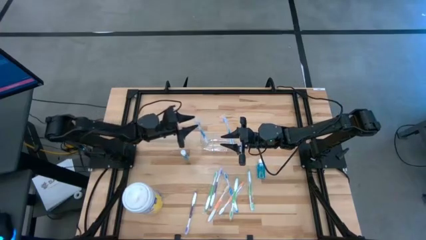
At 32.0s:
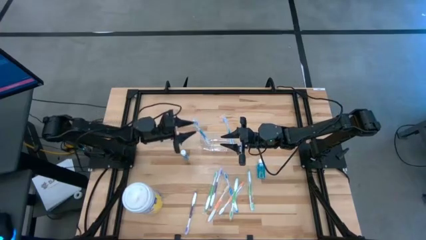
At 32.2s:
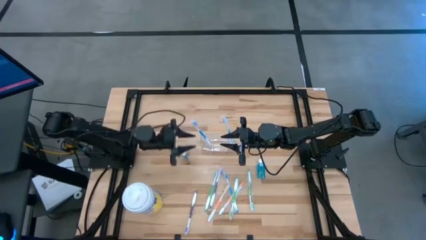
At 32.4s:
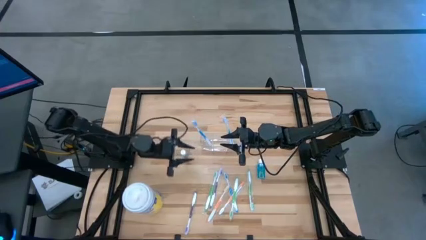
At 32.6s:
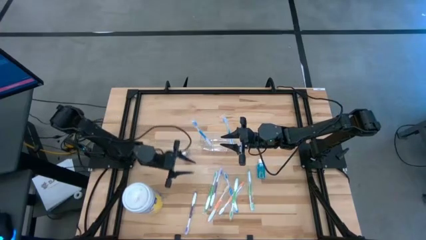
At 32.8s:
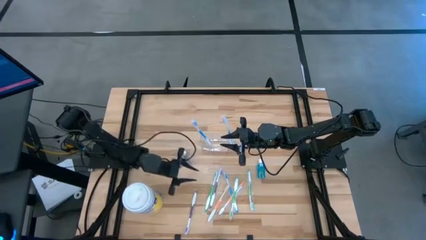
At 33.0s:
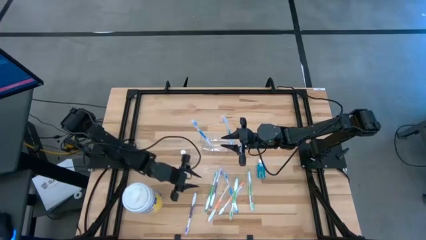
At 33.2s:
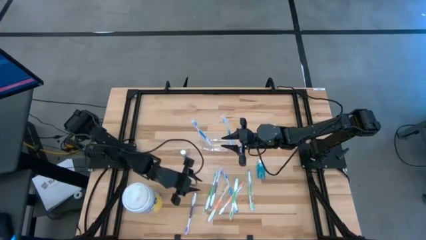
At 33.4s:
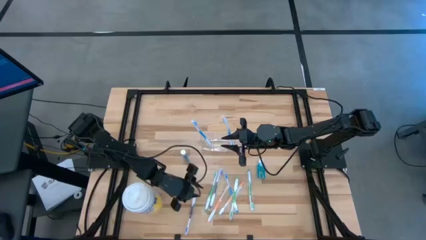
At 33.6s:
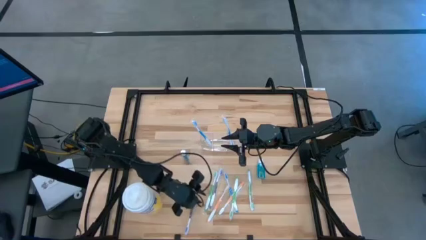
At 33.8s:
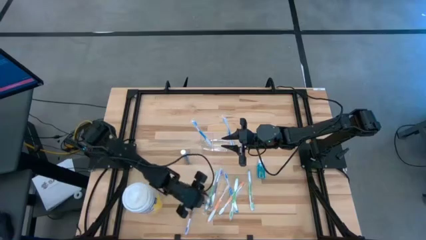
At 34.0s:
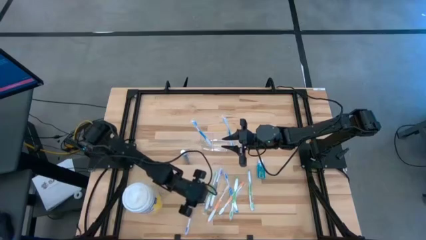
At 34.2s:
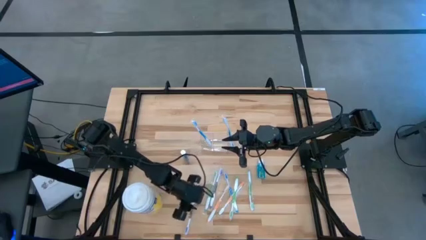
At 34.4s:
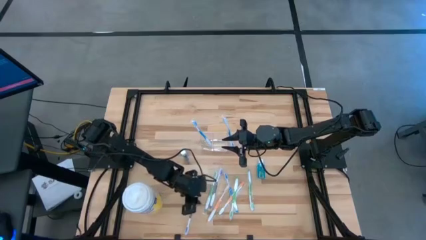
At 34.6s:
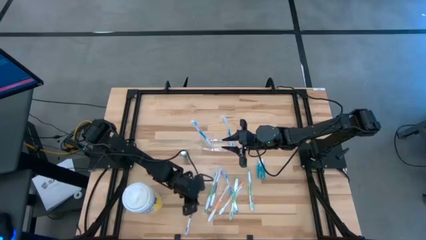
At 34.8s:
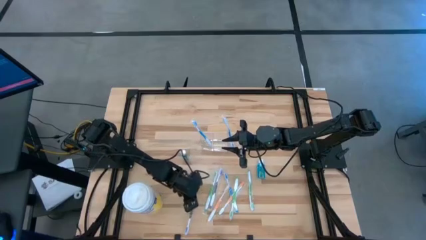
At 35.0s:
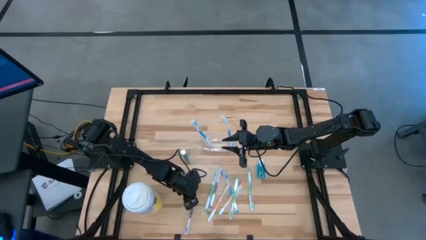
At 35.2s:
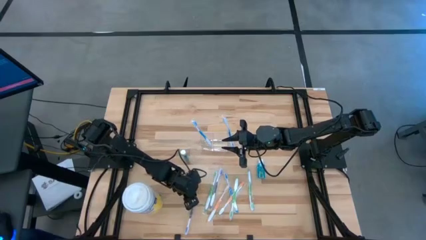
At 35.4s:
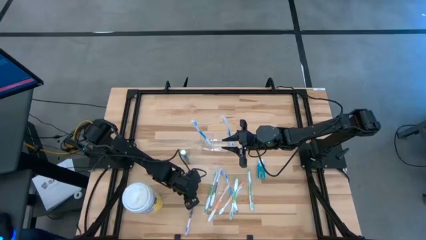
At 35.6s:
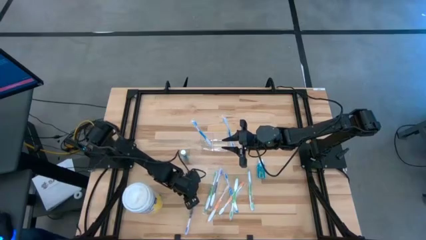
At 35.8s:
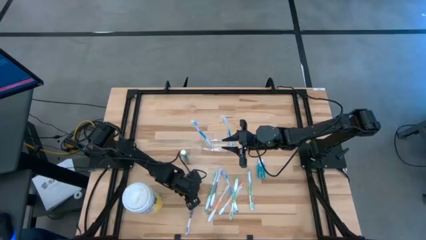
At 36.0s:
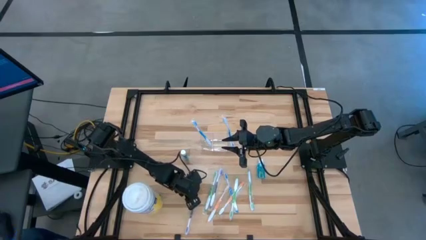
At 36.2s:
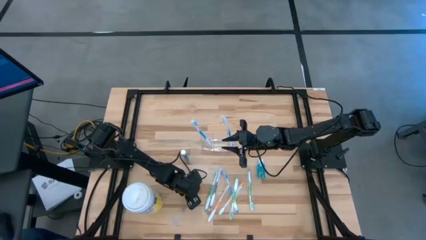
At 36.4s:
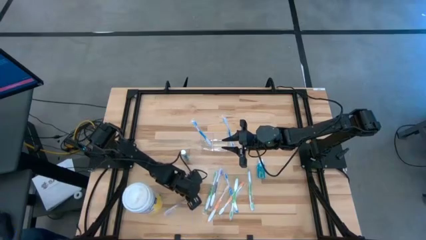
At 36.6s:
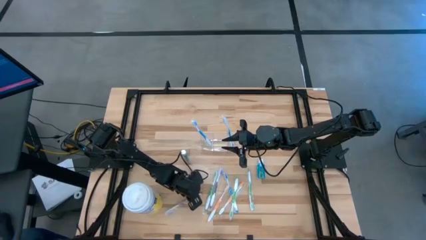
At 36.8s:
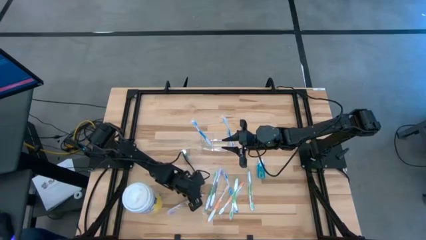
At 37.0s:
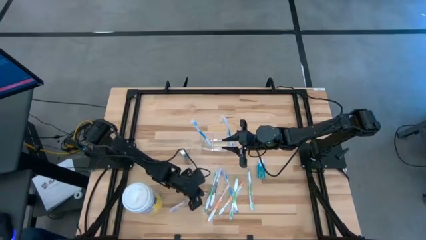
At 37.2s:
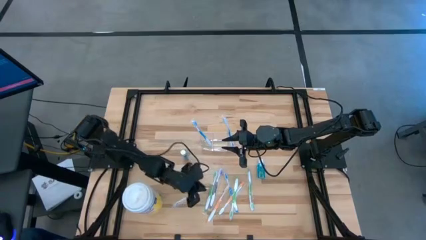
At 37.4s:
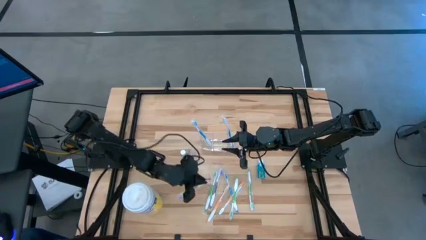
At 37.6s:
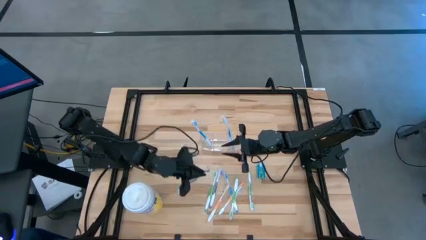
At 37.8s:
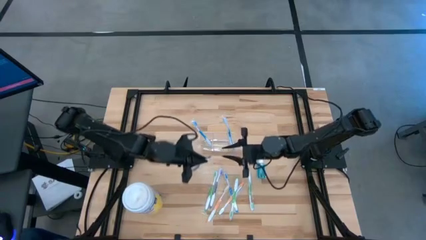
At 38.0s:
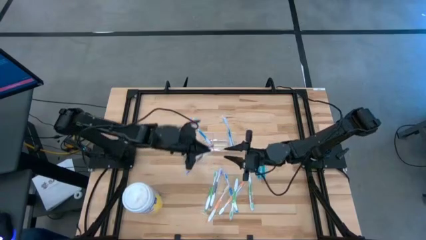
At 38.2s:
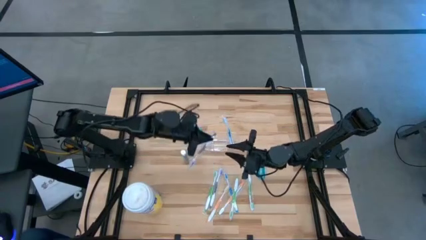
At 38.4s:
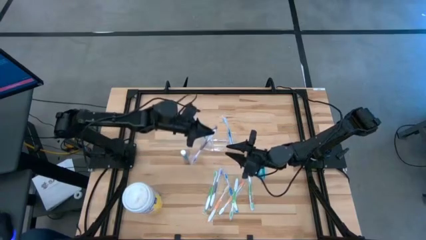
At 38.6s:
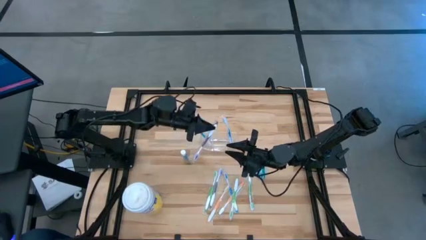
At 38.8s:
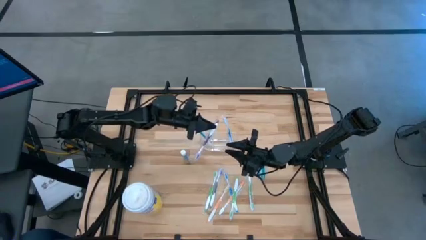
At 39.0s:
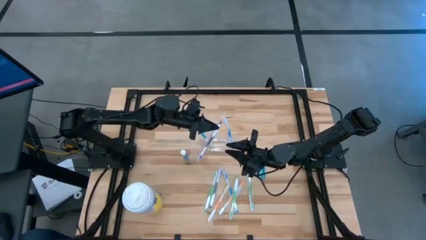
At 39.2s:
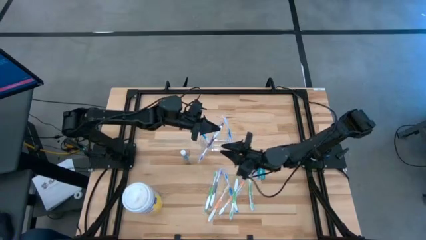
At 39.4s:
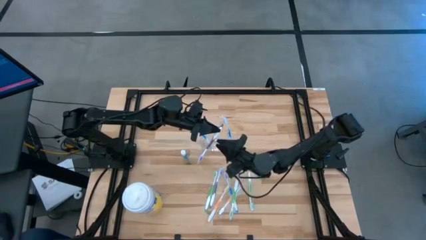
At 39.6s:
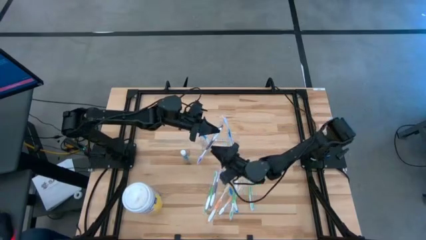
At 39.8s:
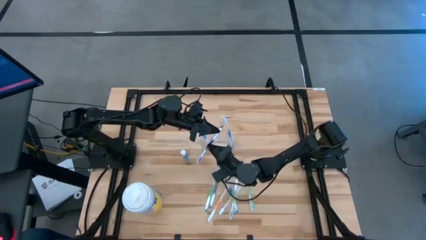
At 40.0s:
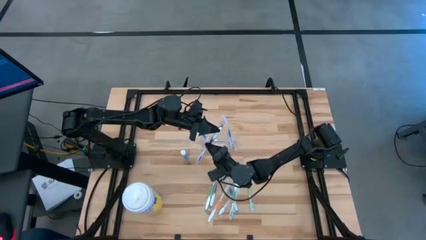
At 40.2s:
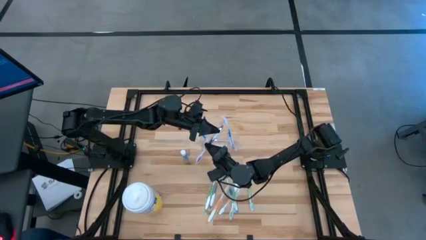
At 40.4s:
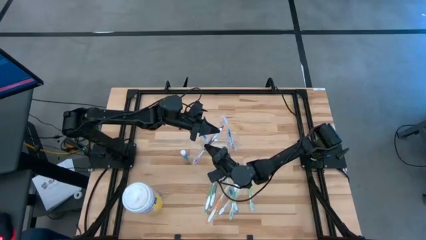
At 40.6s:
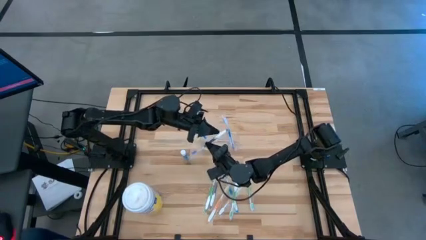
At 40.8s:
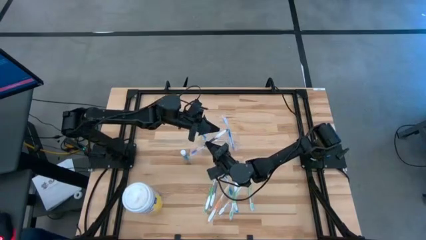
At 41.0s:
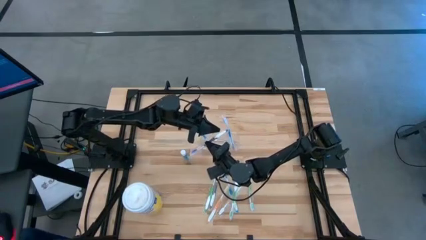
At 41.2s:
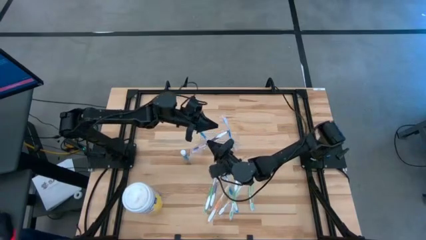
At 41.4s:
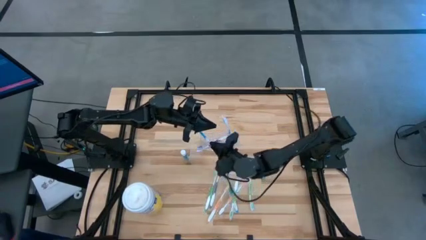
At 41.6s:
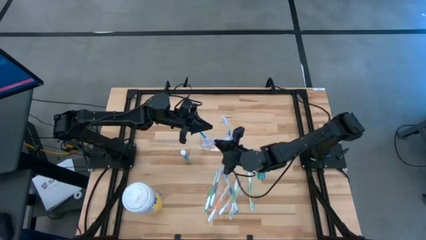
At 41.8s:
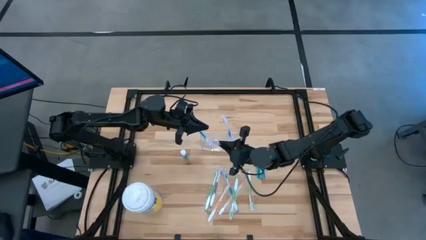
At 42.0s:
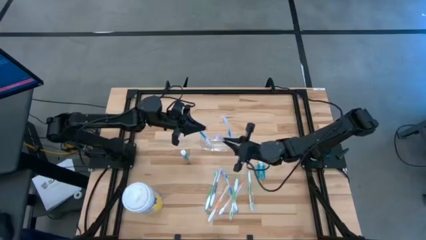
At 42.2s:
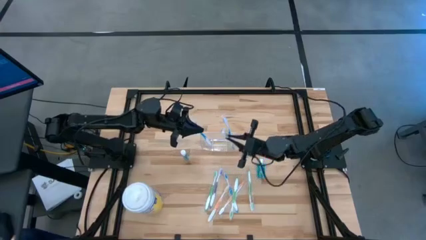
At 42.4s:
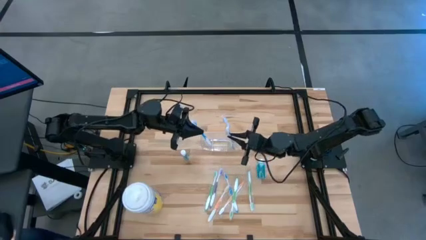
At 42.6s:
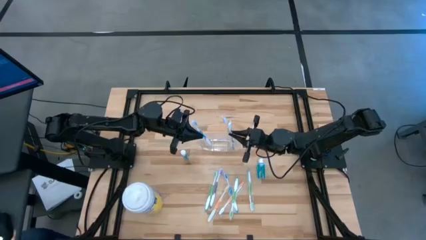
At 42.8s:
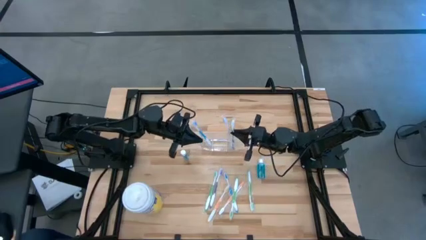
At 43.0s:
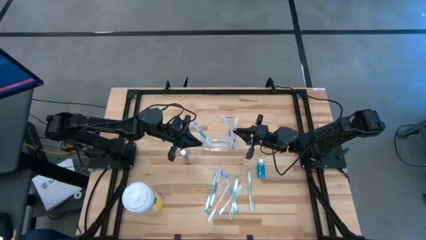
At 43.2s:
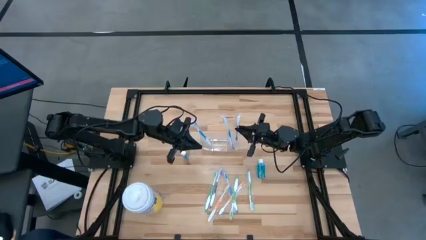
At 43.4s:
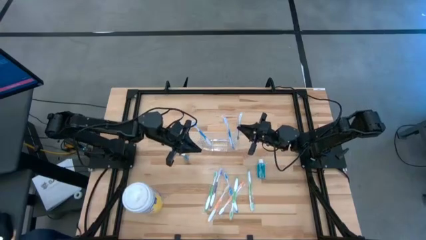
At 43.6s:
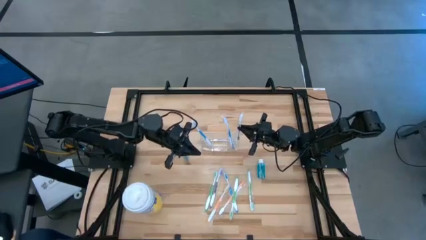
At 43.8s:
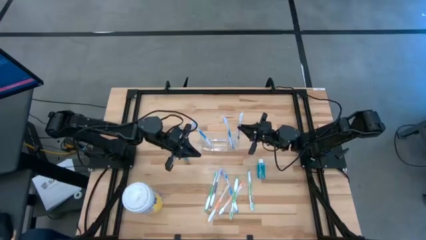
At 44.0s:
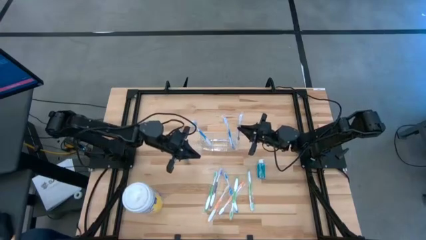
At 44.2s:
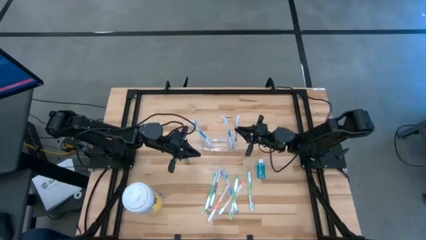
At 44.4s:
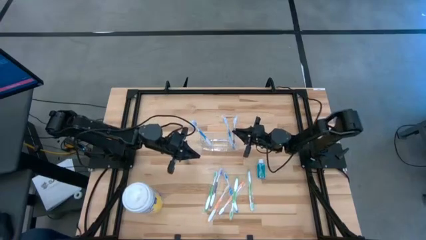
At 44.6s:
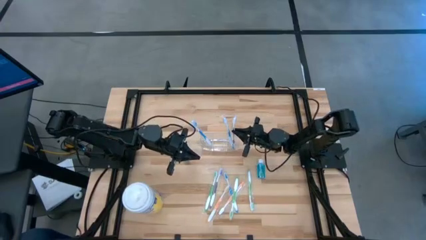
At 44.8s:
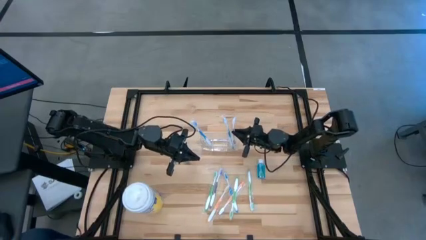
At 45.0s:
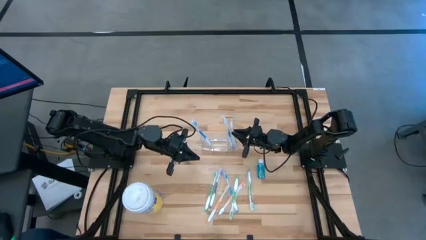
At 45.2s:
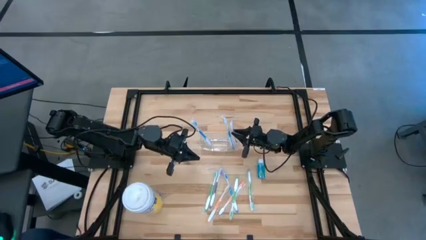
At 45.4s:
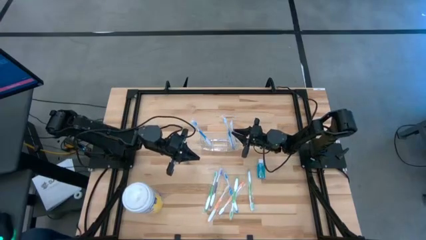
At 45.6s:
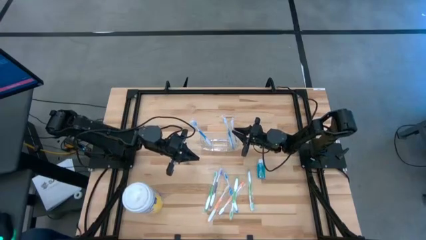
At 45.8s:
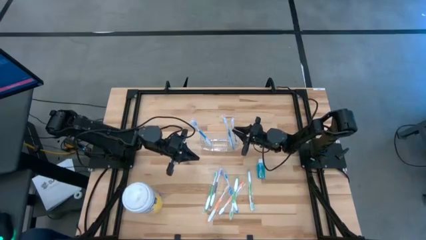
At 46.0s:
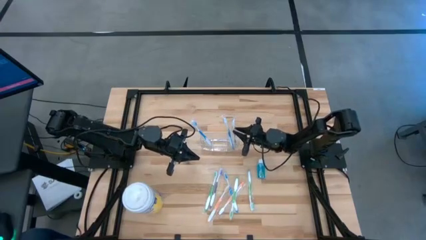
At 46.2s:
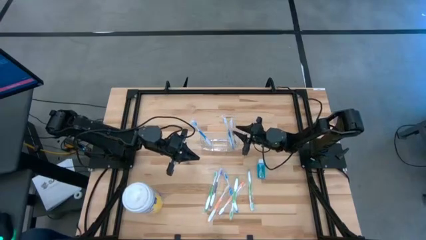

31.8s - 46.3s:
Task: Pick & Place toothbrushing station
Put the violet toothbrush into the transparent organizer

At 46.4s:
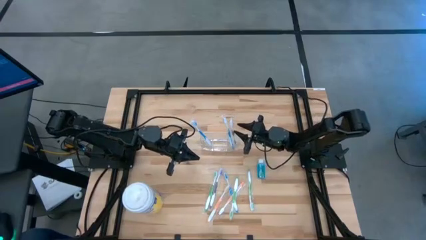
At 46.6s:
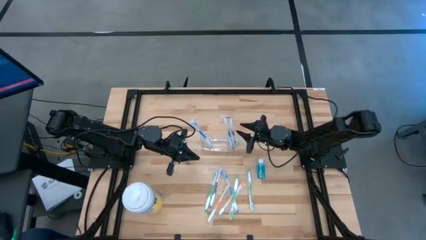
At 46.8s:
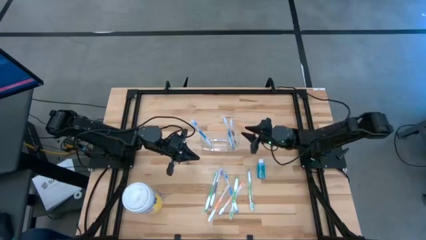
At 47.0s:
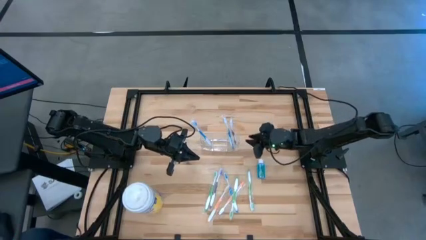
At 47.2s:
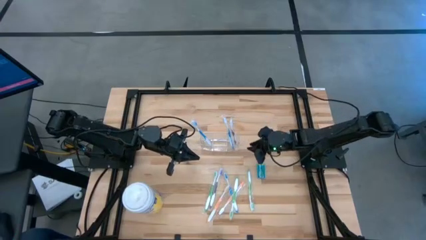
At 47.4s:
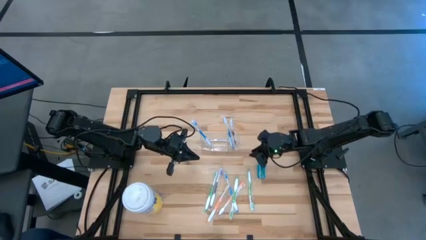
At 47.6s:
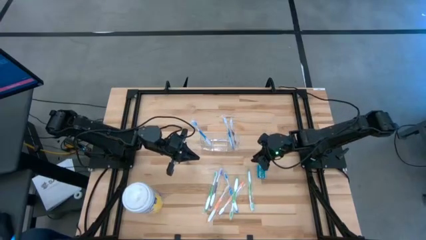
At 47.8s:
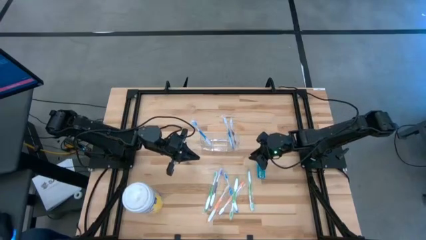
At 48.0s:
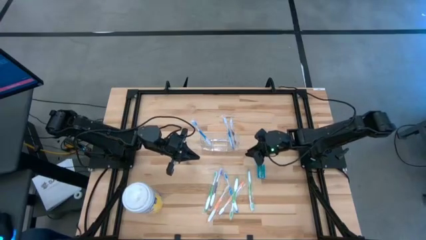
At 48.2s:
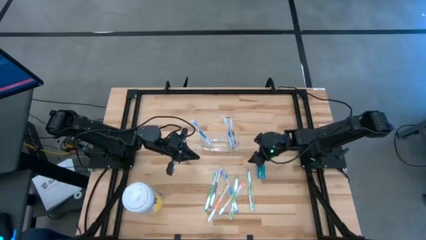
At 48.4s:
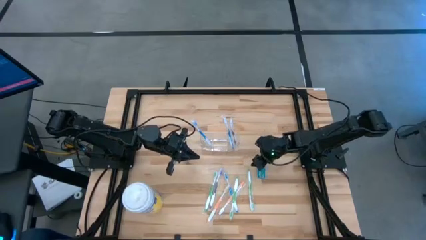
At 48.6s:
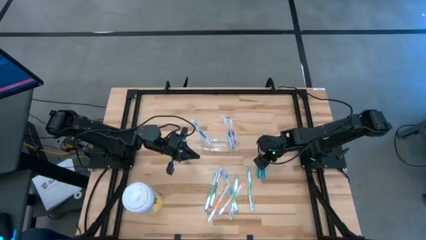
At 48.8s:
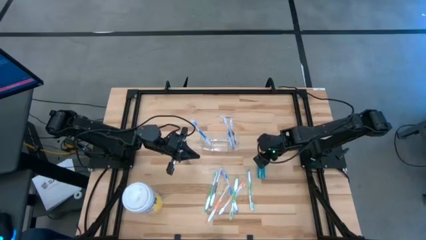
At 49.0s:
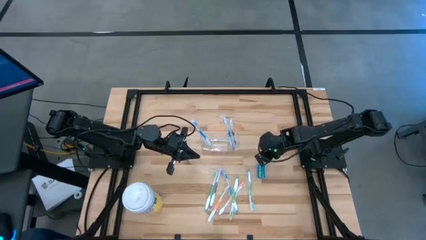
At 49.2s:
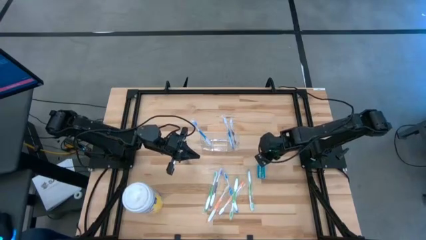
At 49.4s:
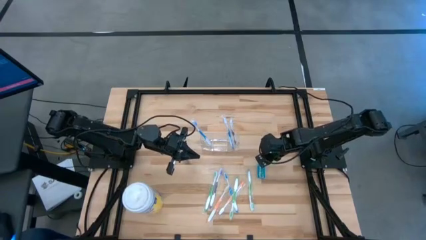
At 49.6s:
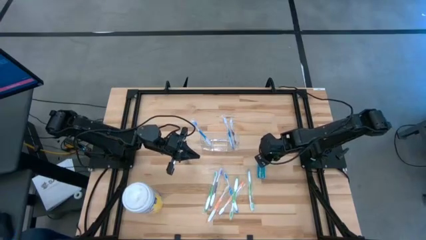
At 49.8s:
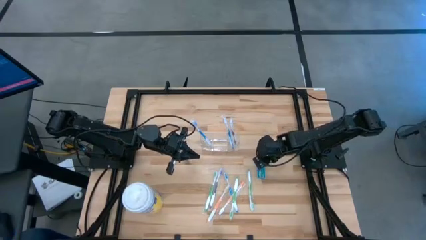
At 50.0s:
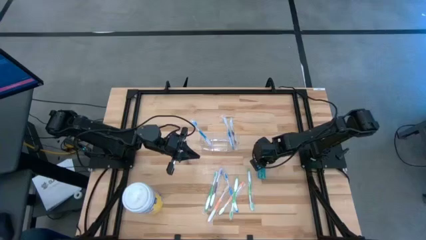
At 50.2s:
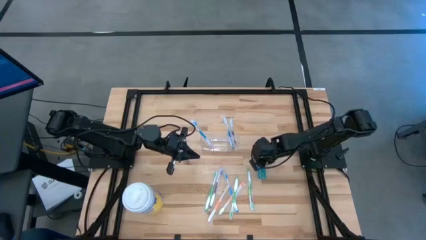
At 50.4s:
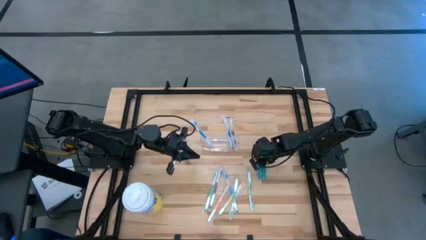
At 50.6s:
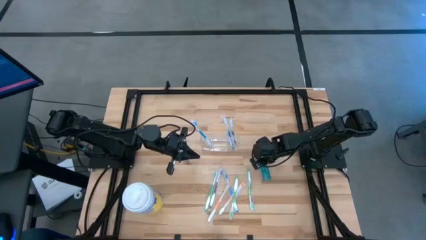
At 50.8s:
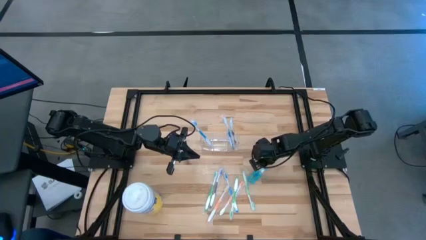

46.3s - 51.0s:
Put the mouthwash into the transparent organizer
